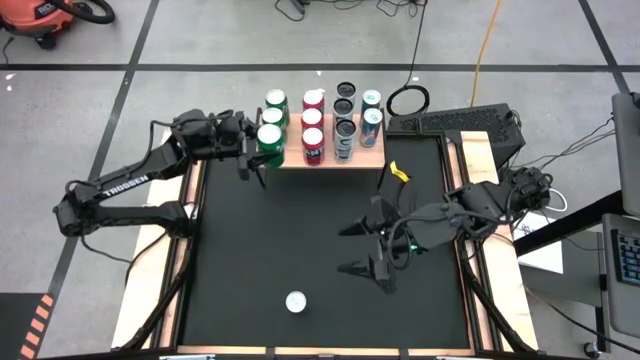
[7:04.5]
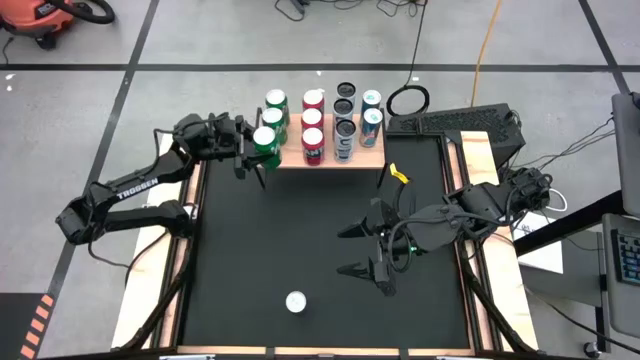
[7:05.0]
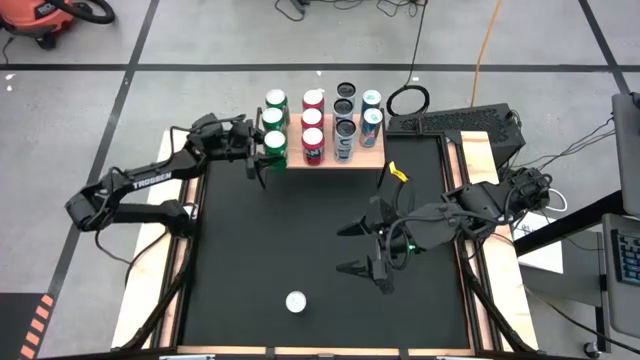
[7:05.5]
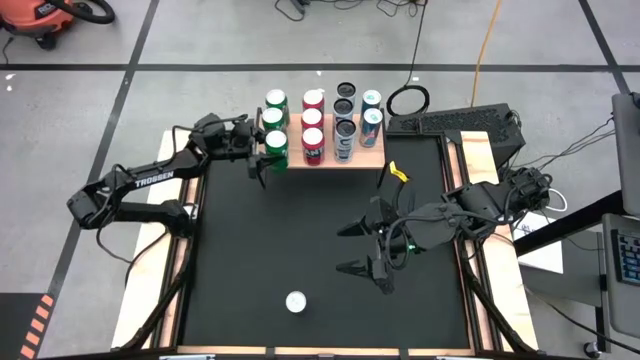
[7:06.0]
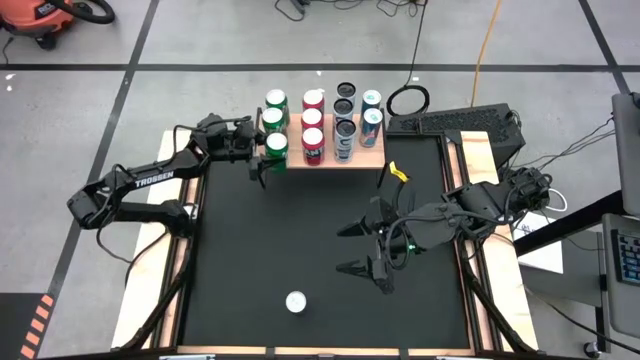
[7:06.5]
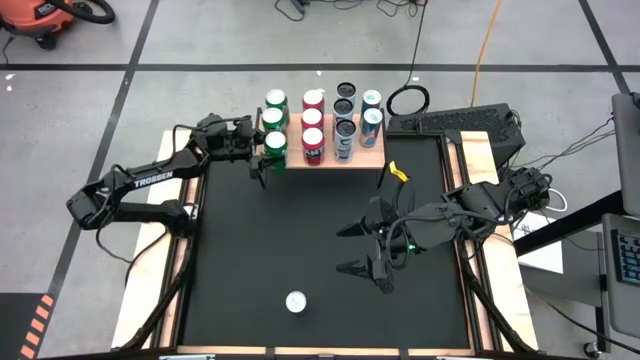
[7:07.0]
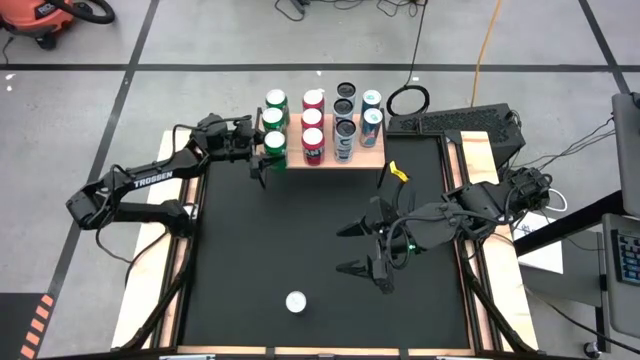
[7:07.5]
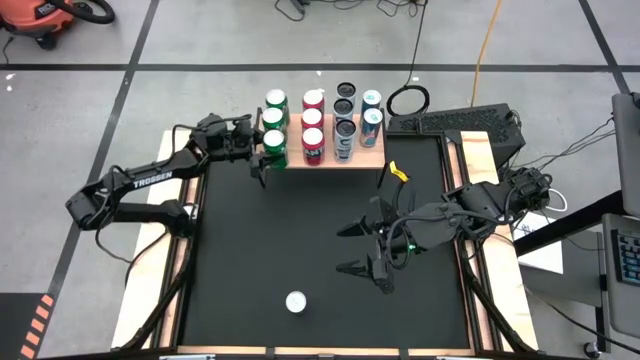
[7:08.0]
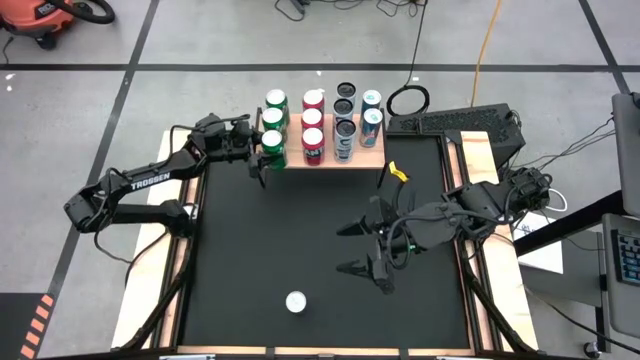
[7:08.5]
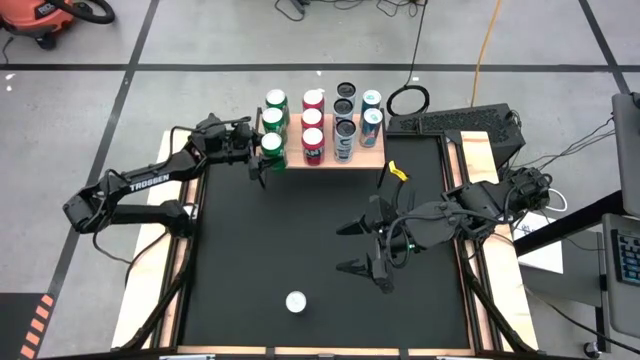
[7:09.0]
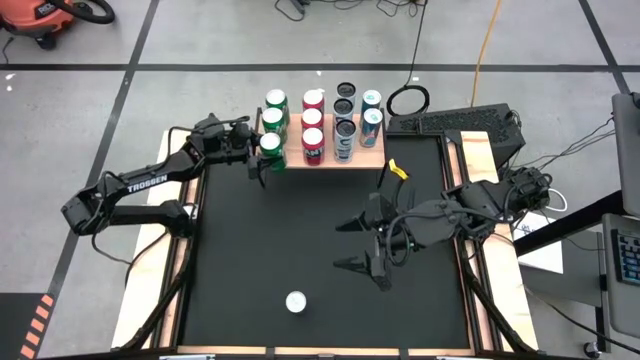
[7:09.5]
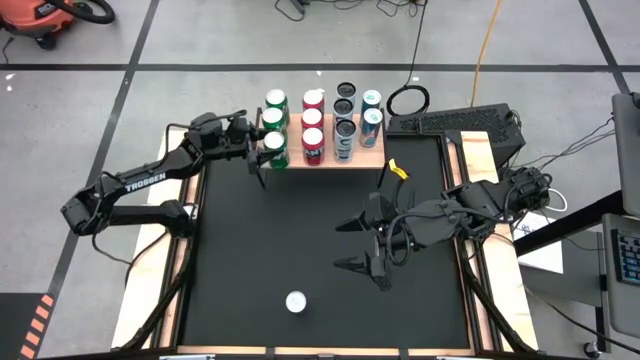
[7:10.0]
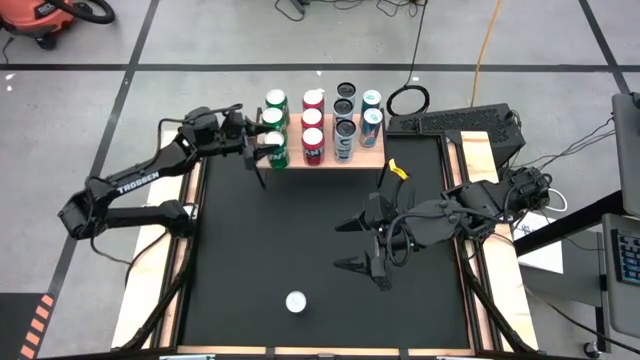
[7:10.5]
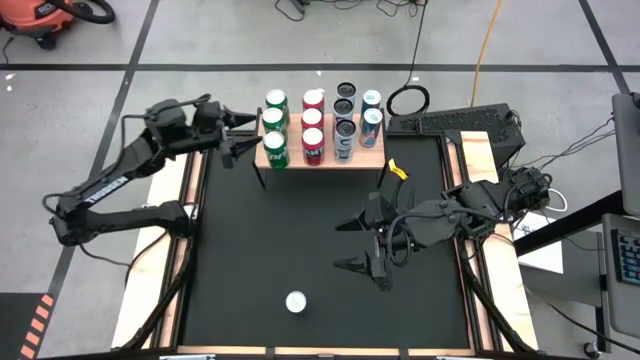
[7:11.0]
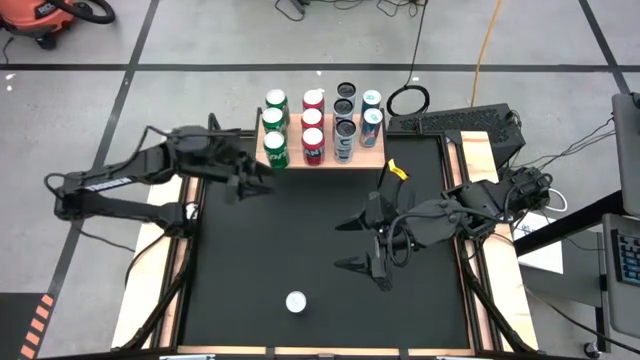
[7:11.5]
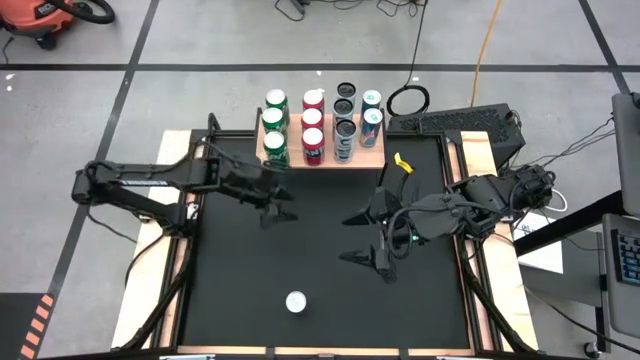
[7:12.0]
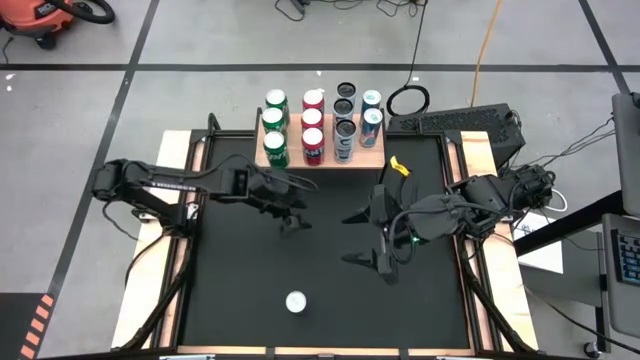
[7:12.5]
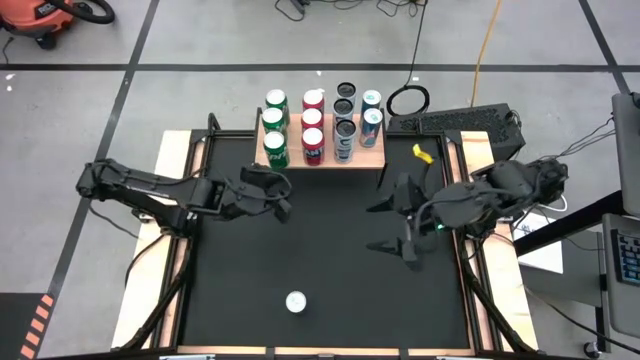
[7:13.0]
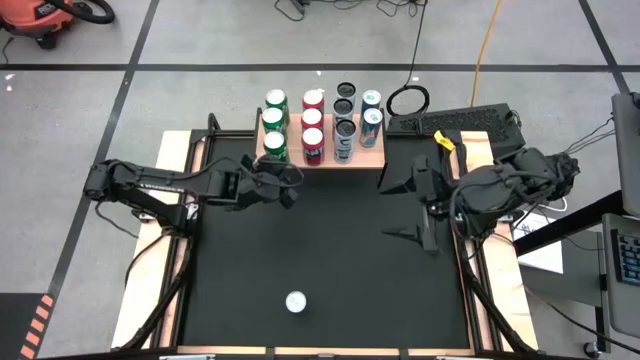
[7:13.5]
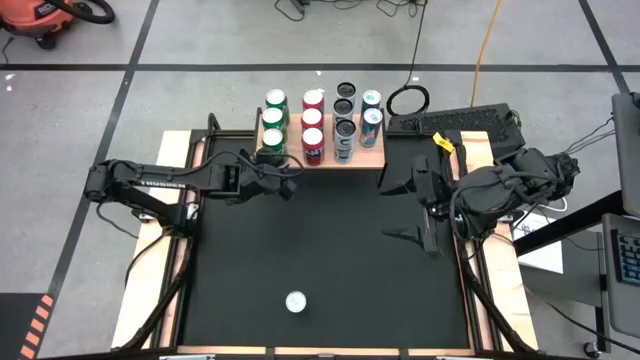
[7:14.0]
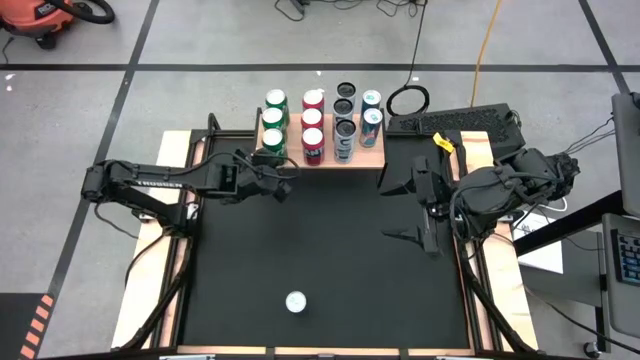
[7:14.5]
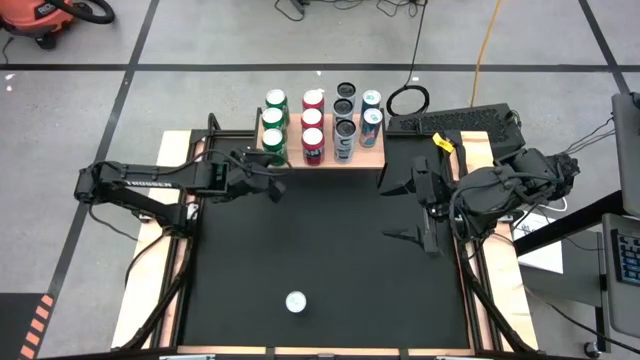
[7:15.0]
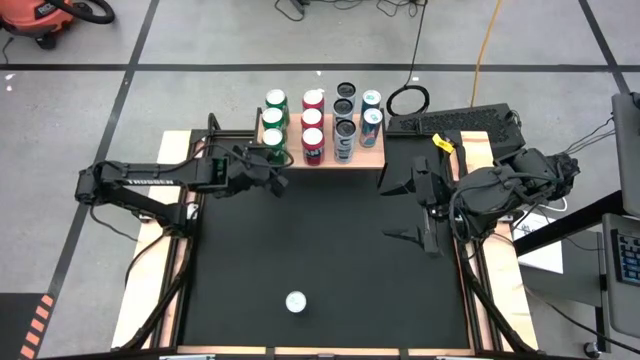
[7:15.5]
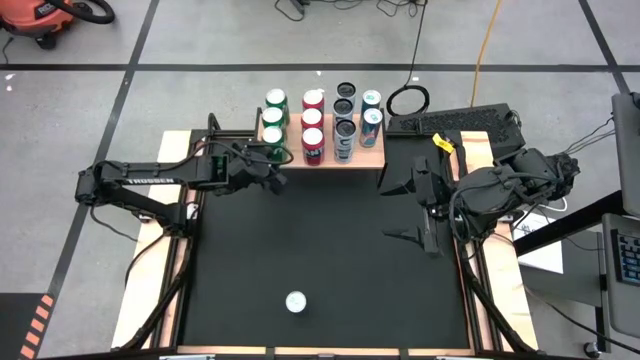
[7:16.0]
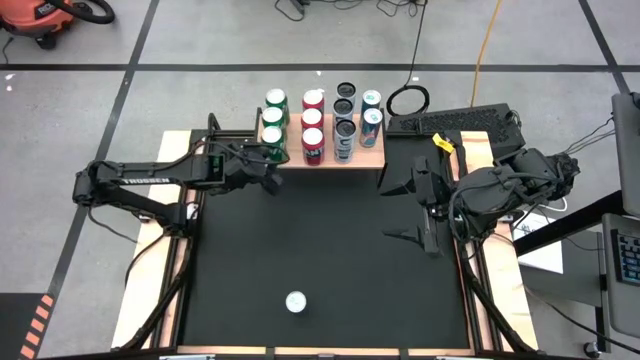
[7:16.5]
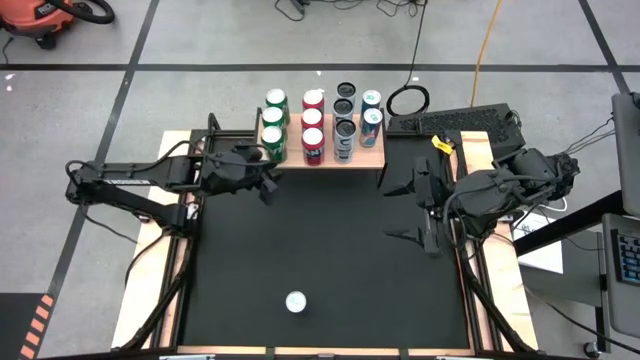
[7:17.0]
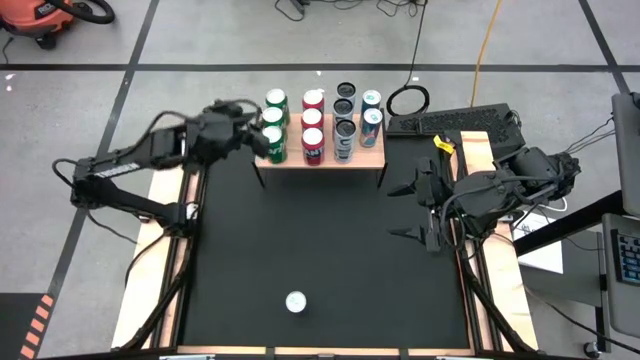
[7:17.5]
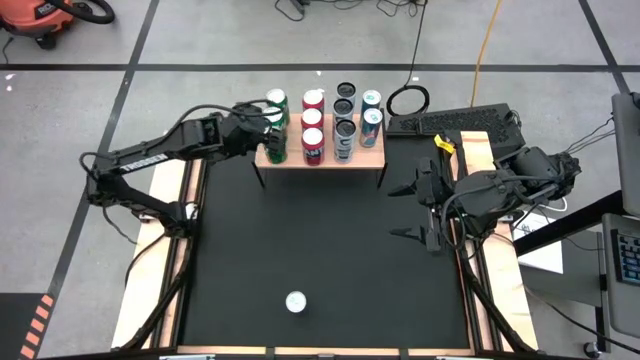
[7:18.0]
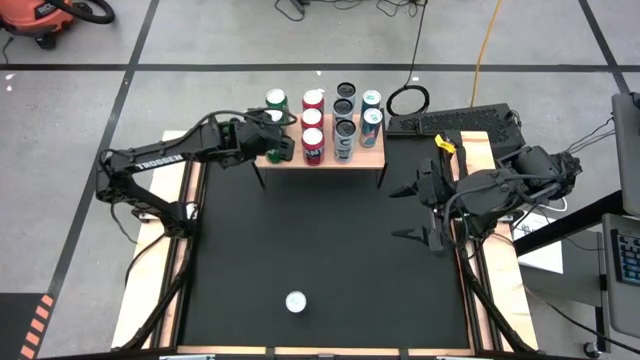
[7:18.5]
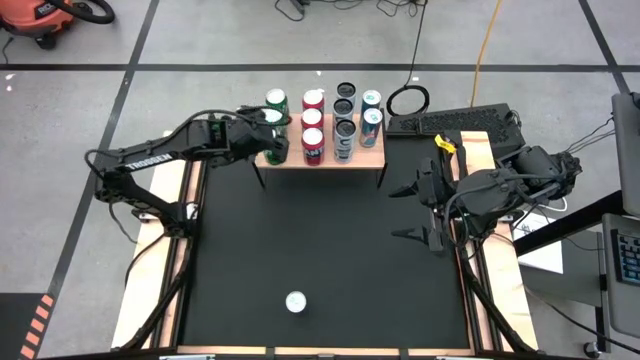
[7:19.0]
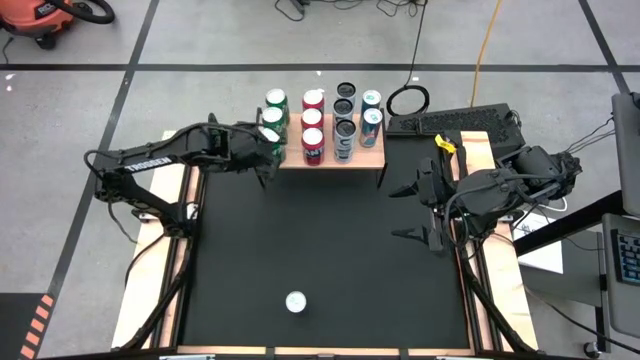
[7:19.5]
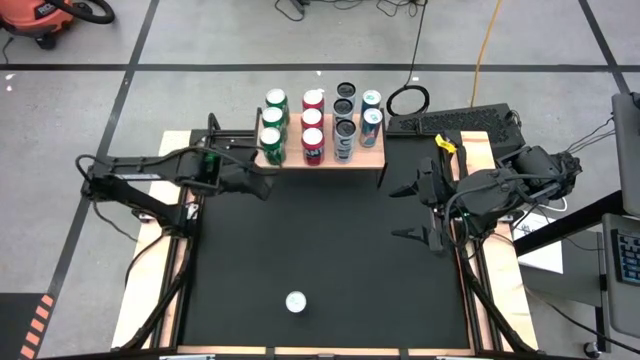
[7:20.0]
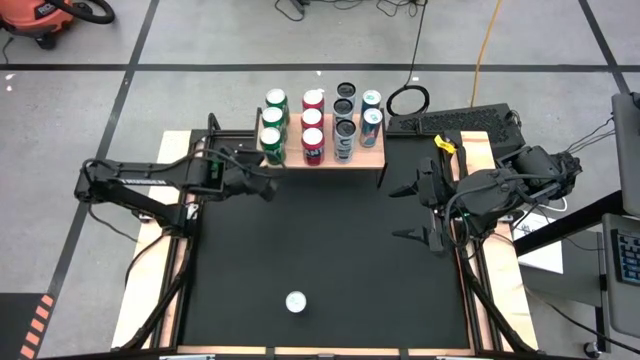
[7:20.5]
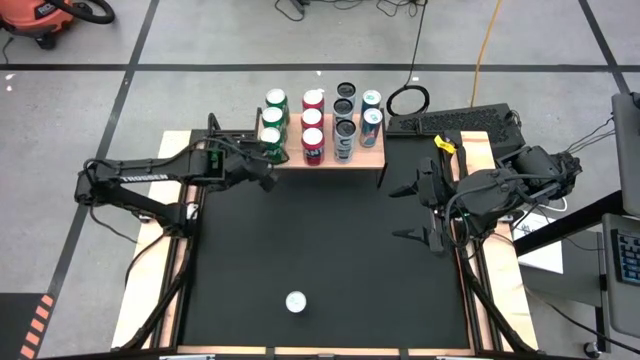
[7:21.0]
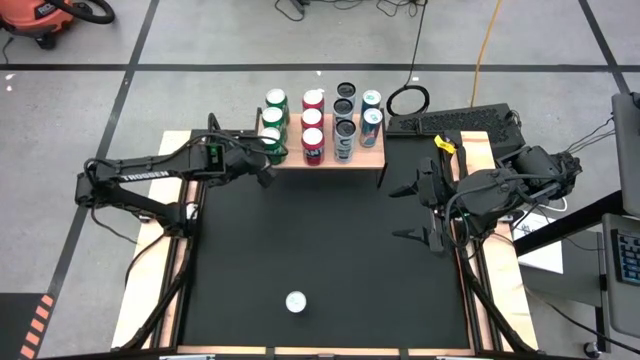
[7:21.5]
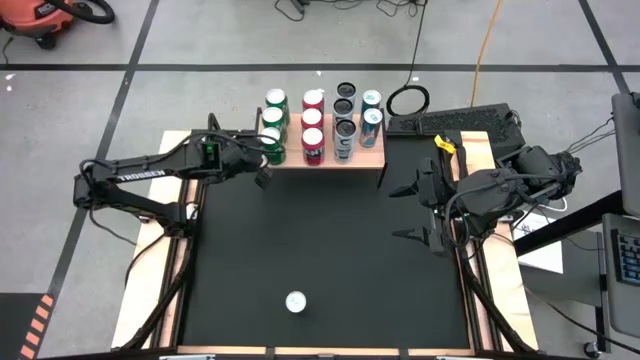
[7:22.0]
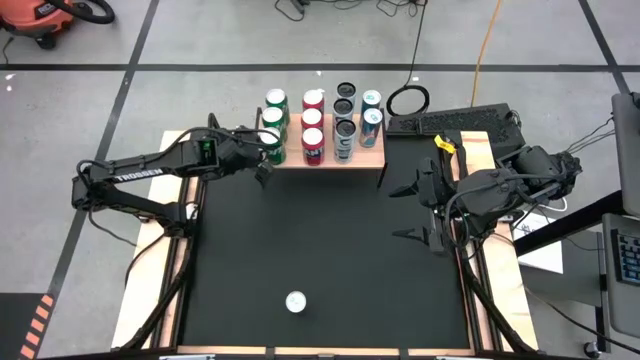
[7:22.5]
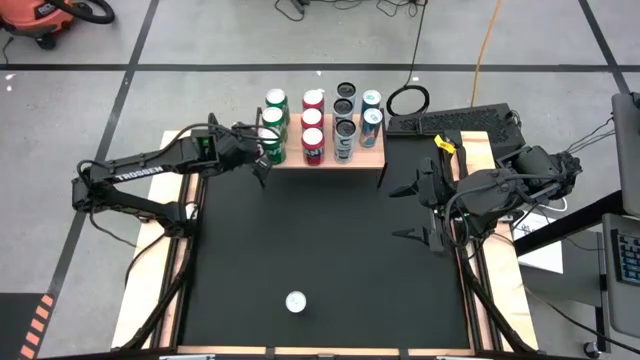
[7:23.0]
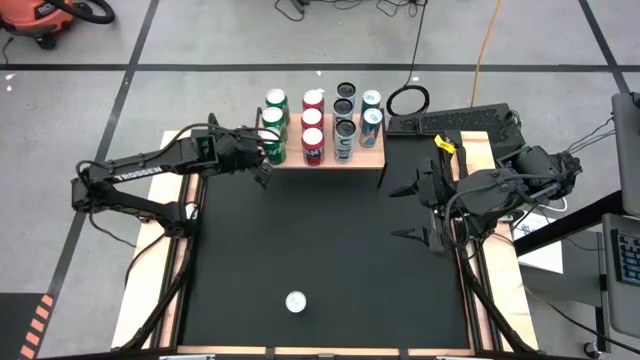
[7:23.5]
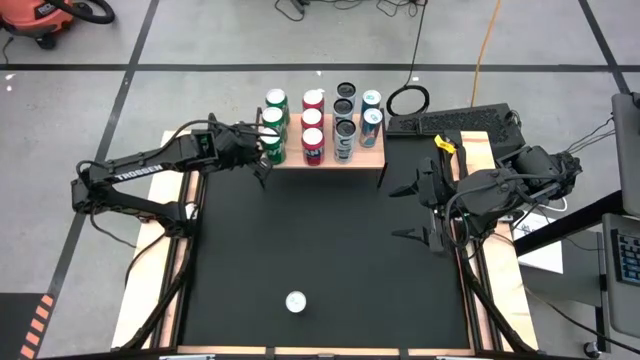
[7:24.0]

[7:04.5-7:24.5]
Task: Place canned beverage on shelf
Put the green soda can on the shelf aligned with the other green soda can
